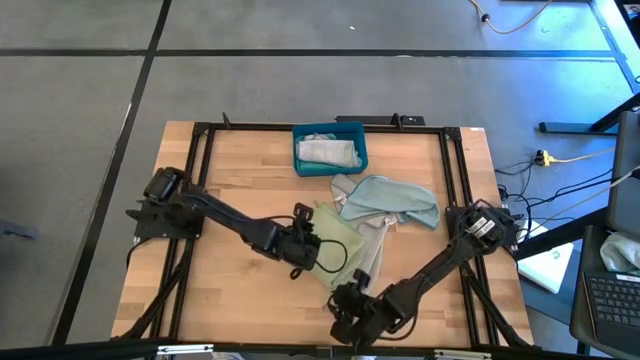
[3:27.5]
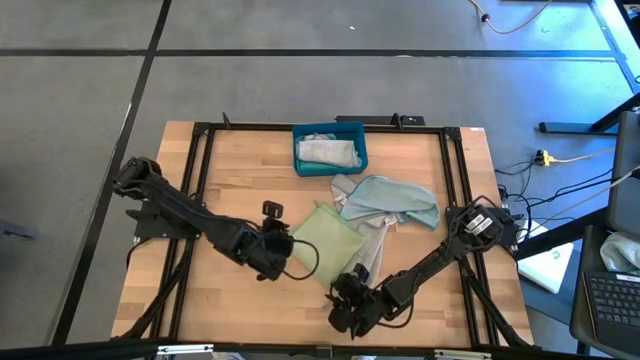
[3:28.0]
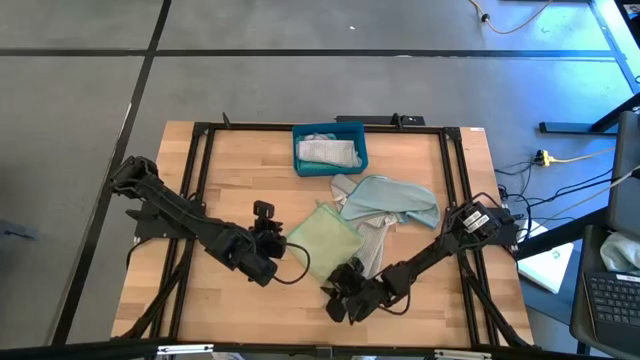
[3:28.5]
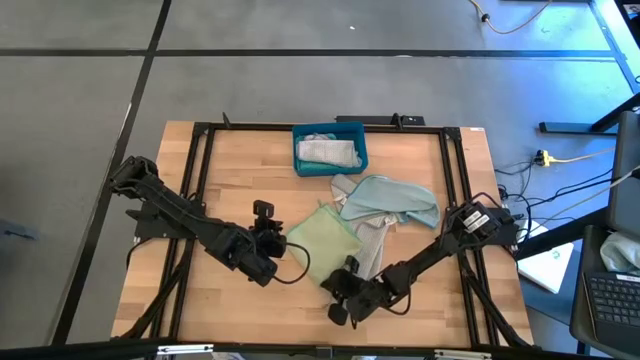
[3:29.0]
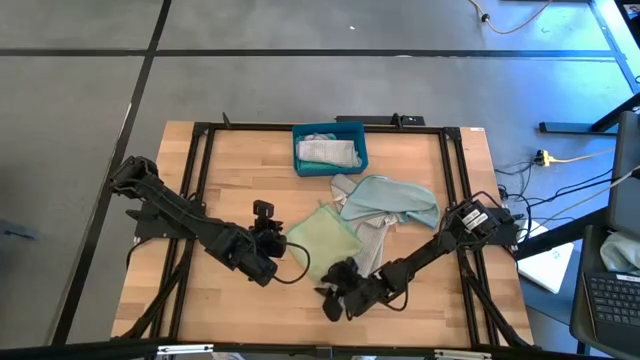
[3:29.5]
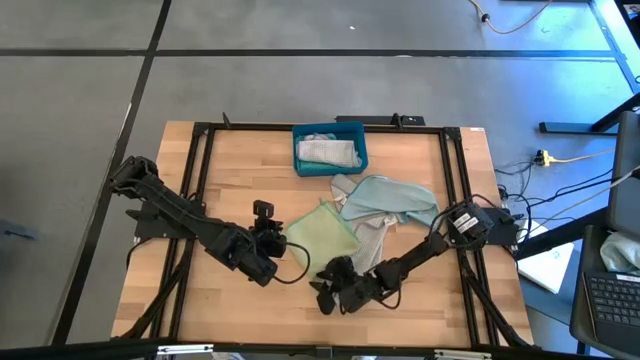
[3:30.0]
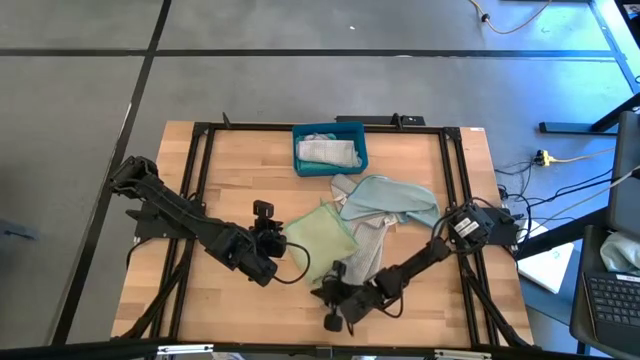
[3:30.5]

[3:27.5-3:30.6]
Task: Fold microfiber towels
Put the folded green towel into the blue bin

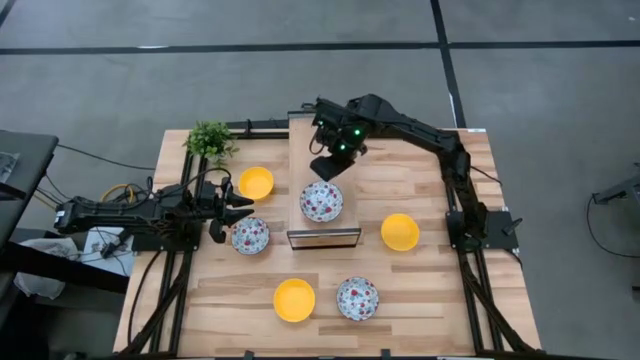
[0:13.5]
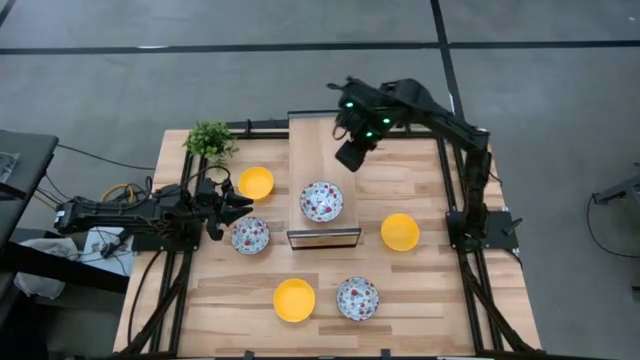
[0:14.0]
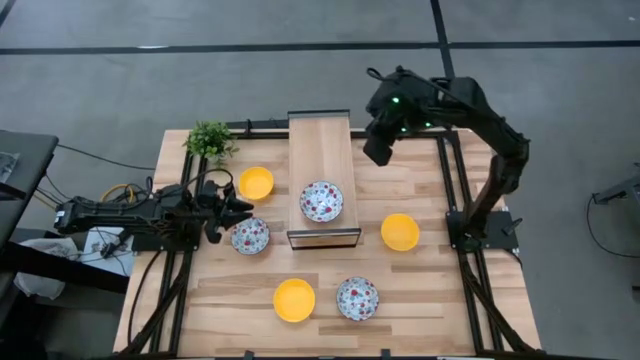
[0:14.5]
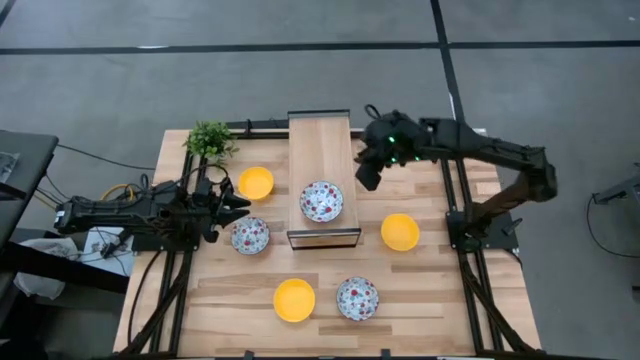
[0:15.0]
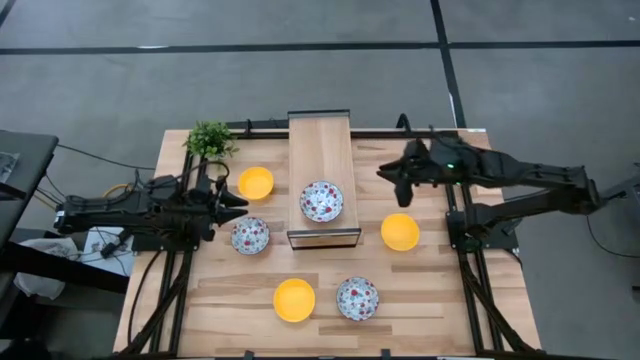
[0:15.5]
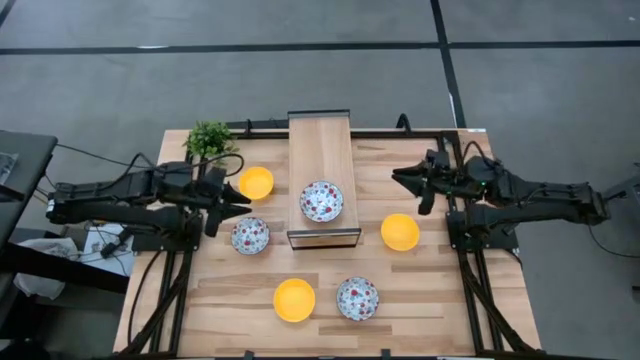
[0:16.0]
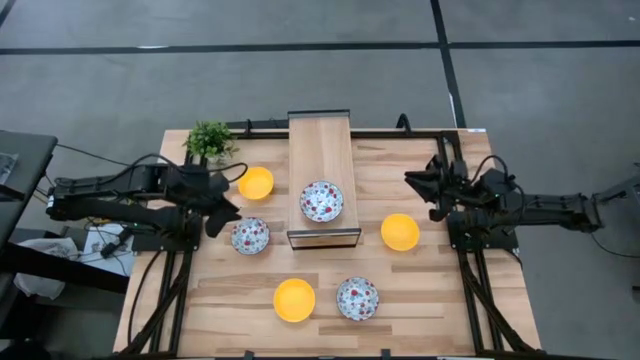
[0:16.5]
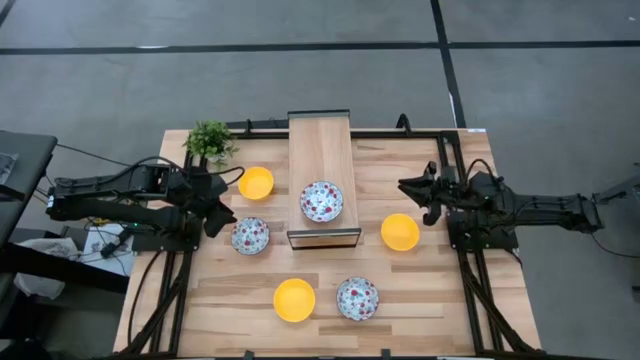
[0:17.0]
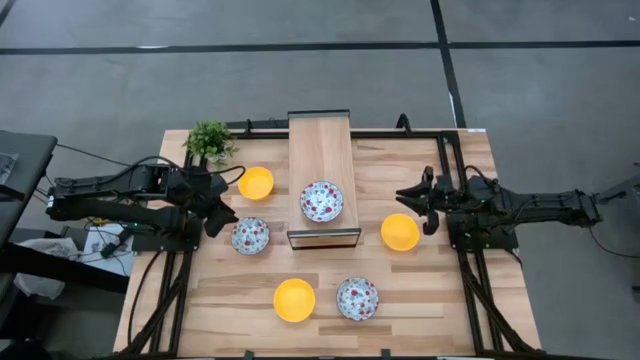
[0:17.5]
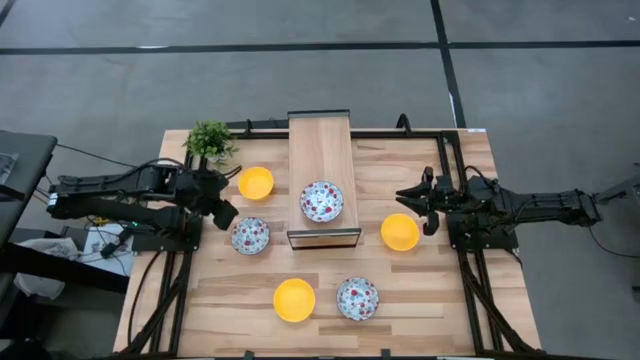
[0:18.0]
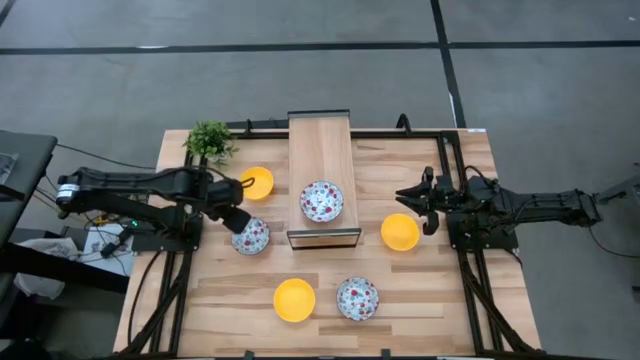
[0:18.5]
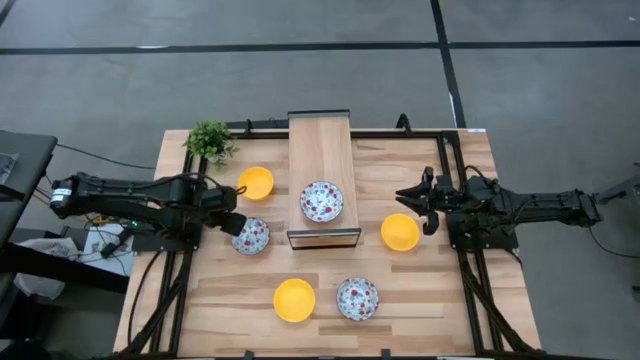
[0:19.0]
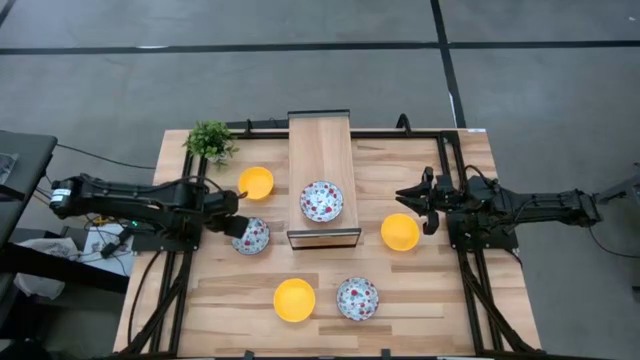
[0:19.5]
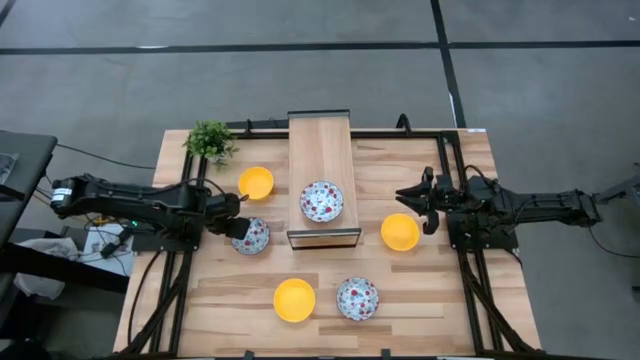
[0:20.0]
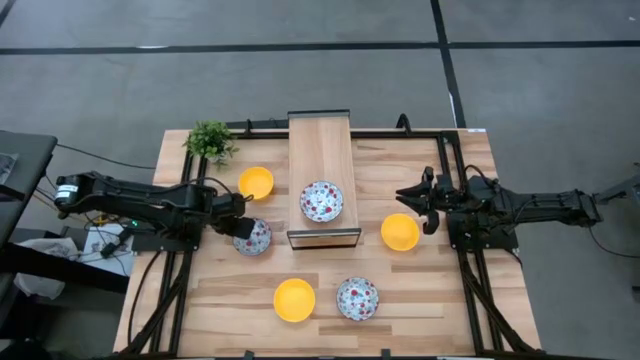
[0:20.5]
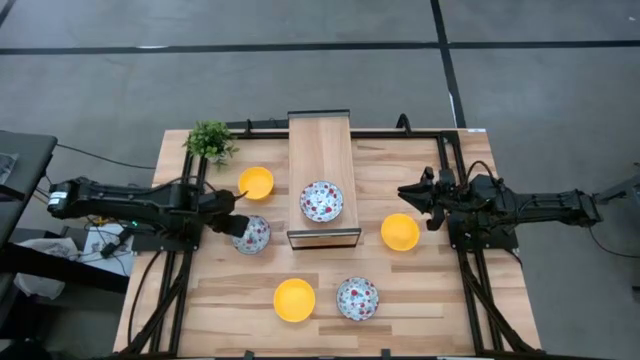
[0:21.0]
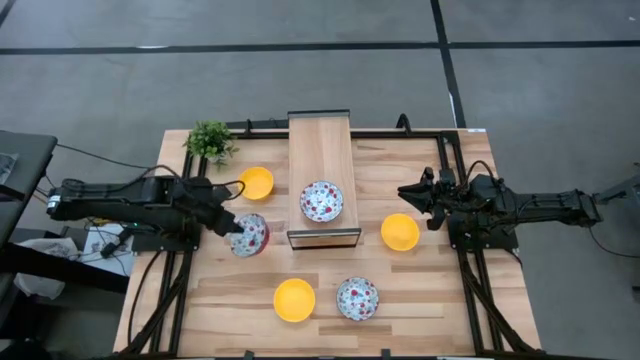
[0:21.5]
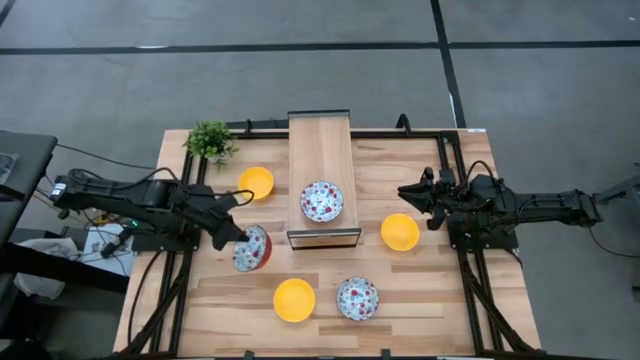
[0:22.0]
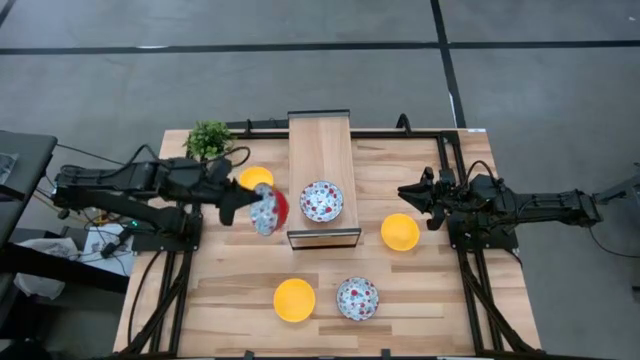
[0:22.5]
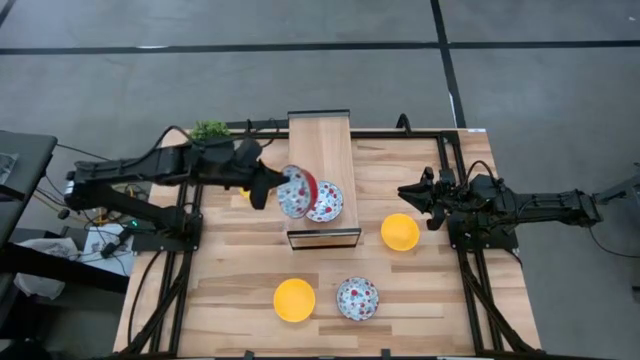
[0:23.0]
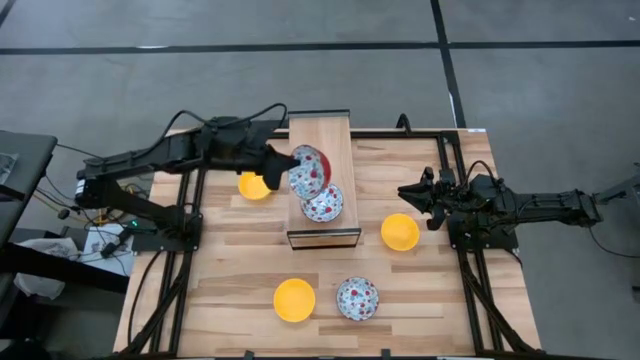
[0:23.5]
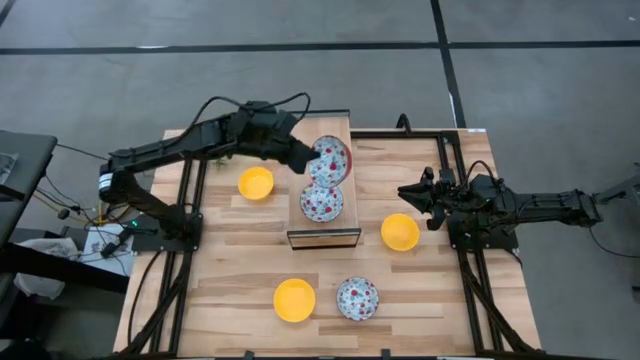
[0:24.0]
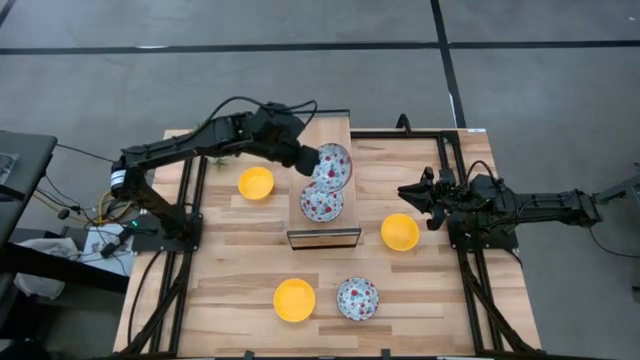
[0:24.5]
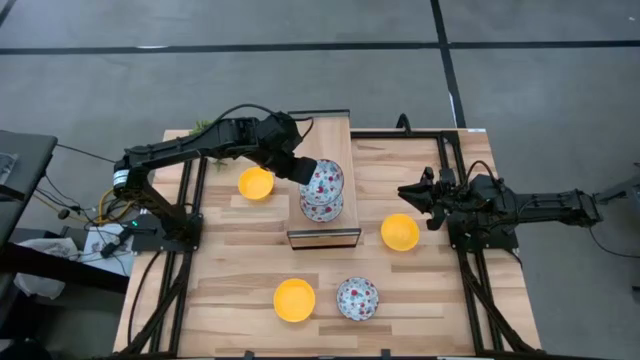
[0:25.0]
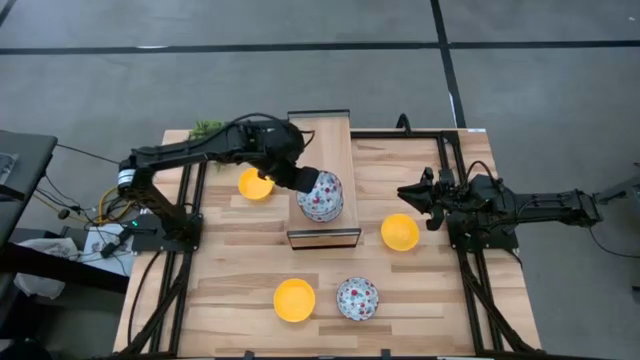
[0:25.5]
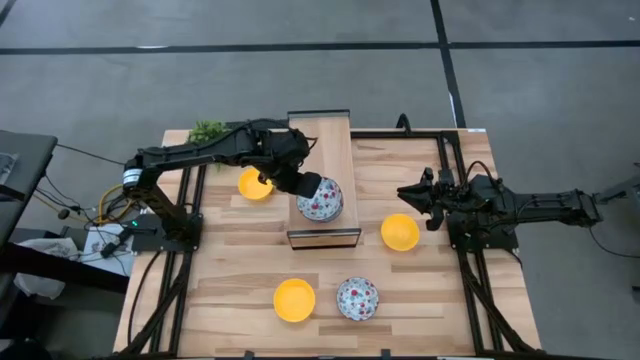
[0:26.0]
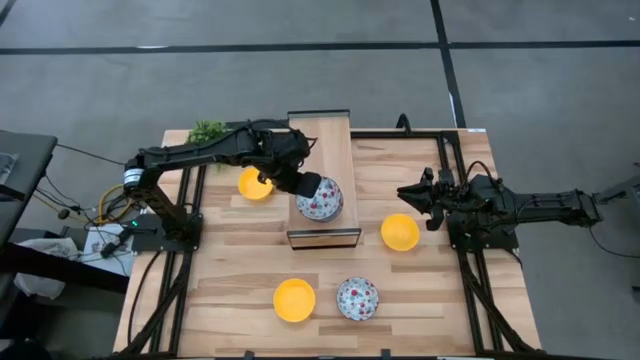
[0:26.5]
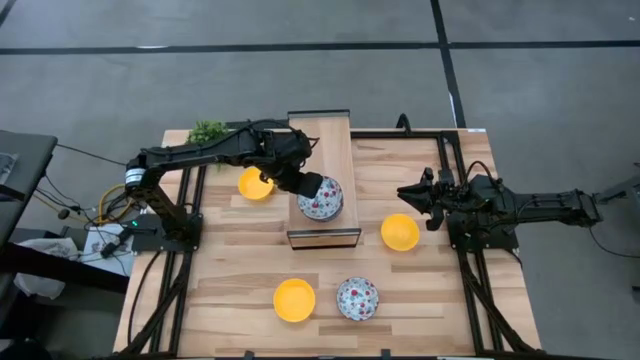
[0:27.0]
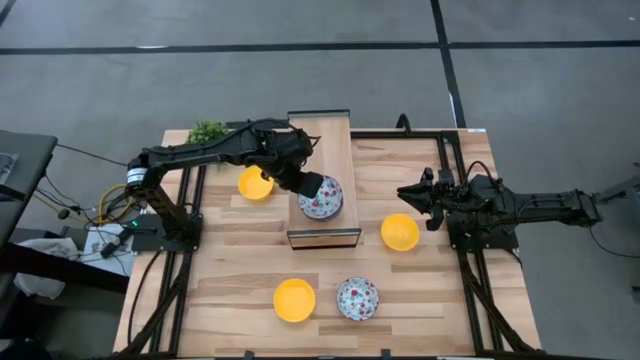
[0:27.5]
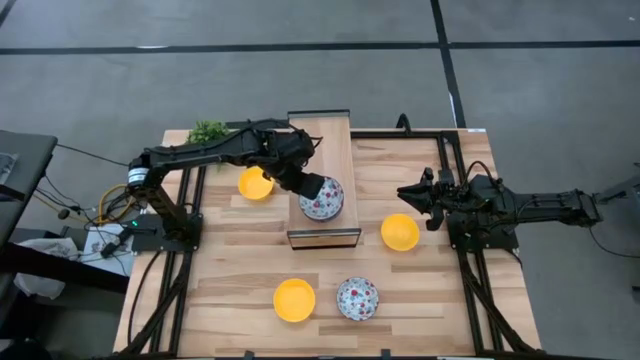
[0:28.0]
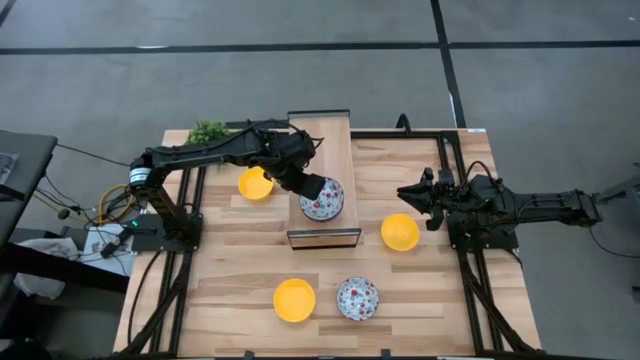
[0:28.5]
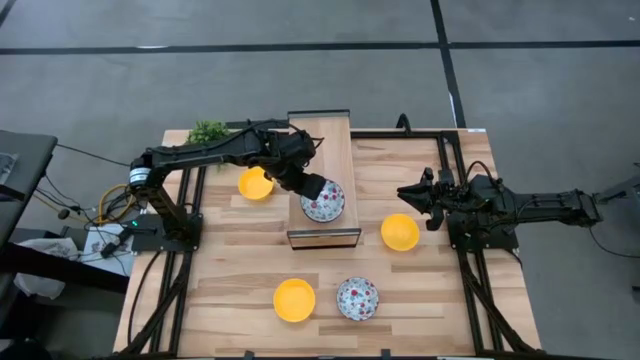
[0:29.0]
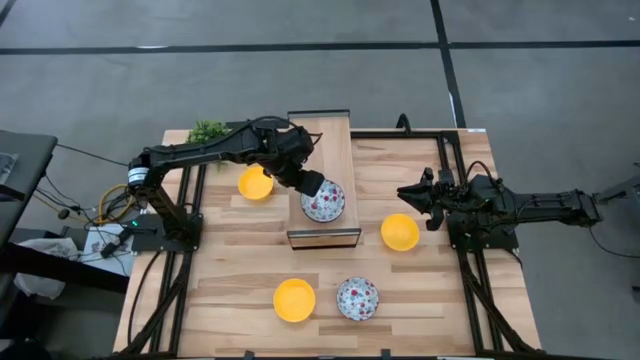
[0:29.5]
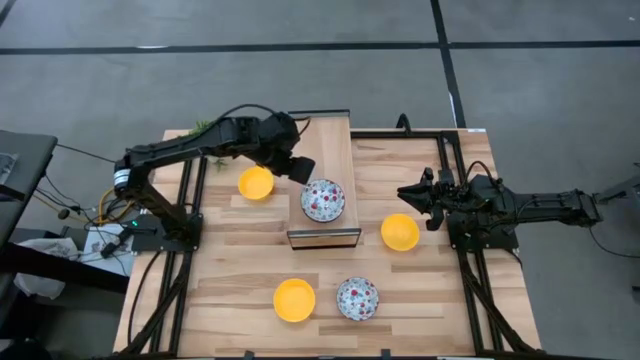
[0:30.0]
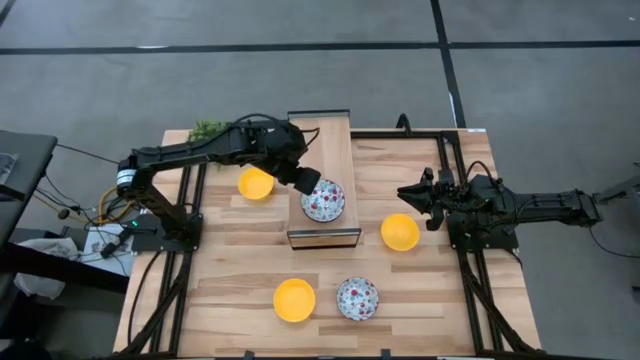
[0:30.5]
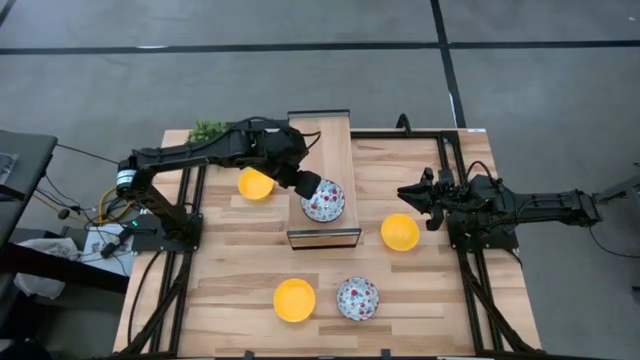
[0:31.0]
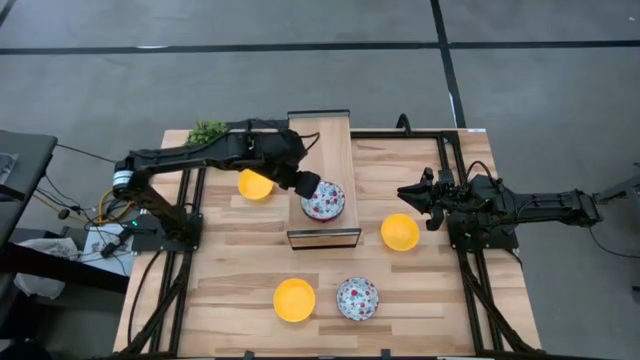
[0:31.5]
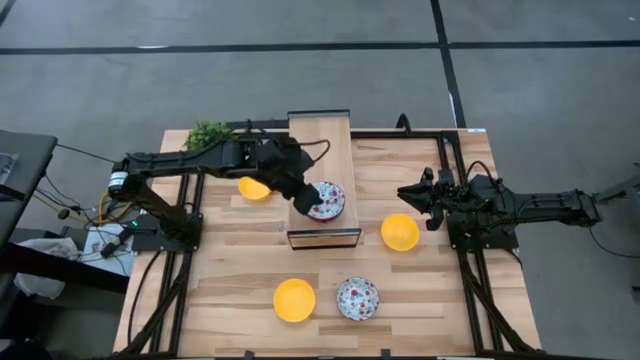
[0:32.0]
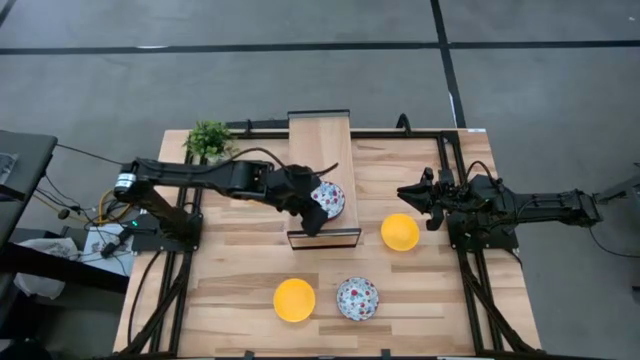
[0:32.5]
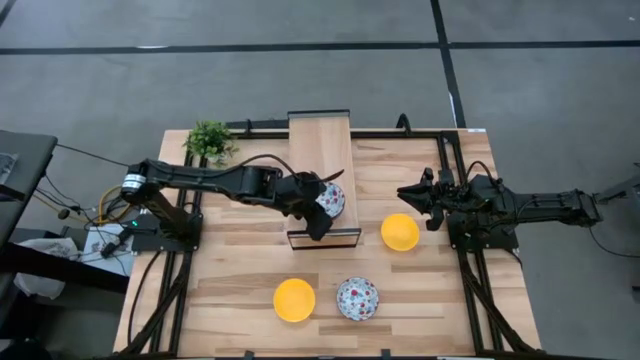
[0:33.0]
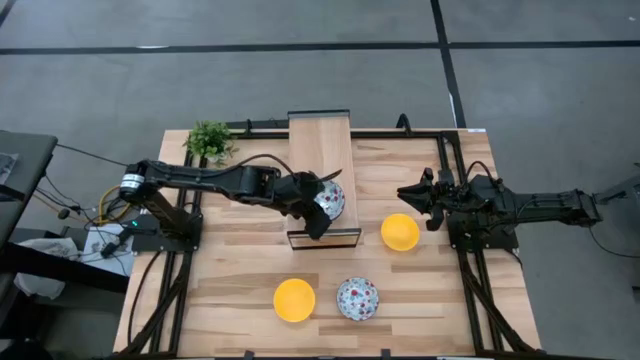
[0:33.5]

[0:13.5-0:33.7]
Task: Pick & Place Mini bowls
Stack the top white patterned bowl on top of the white patterned bowl on the shelf
